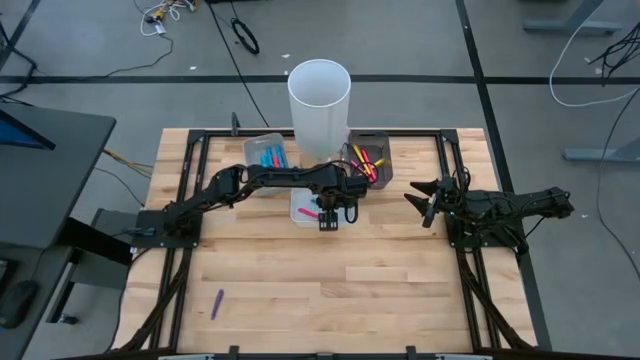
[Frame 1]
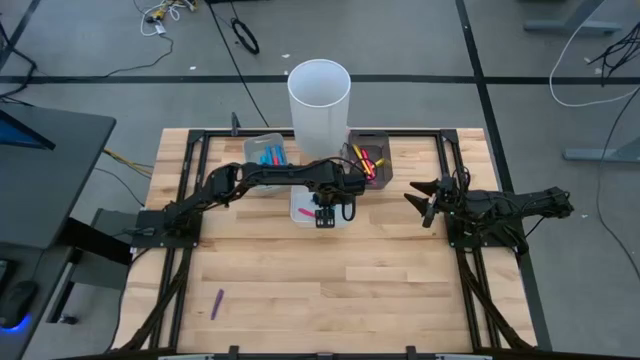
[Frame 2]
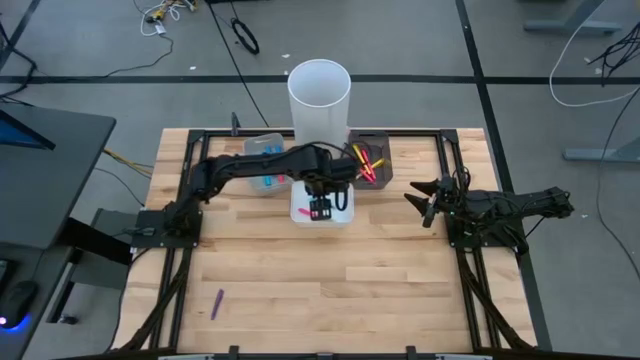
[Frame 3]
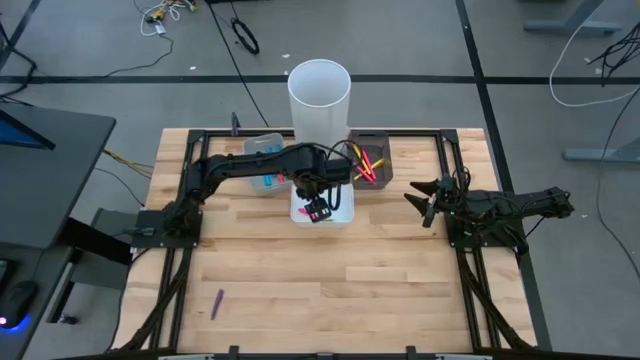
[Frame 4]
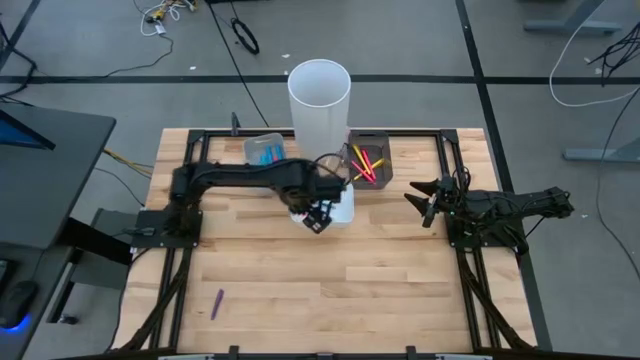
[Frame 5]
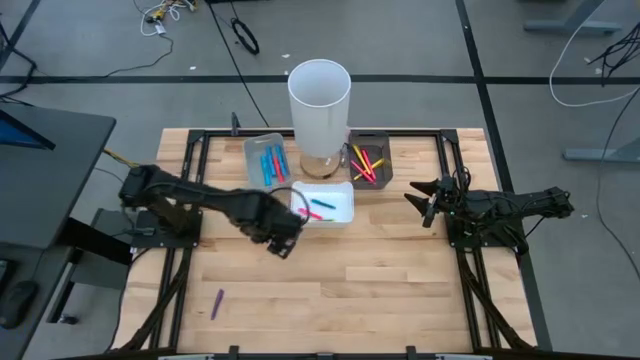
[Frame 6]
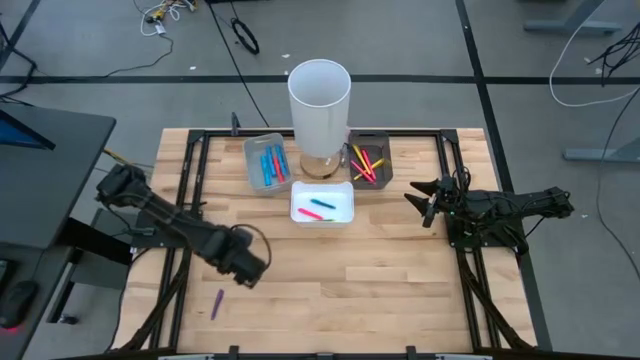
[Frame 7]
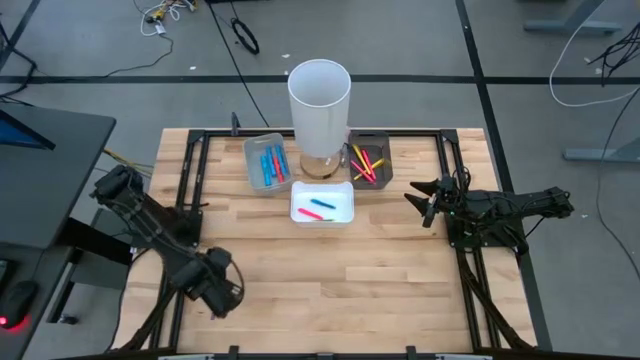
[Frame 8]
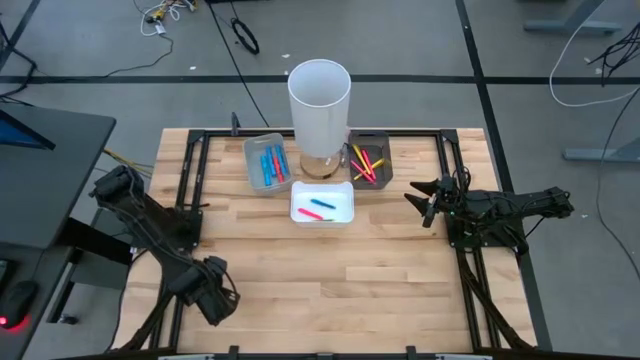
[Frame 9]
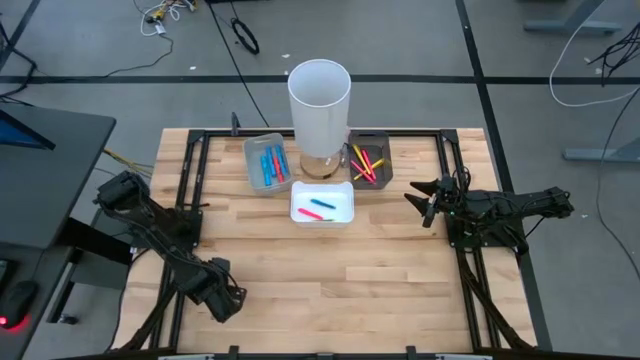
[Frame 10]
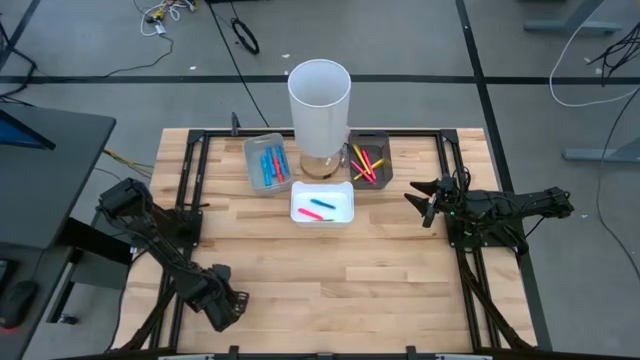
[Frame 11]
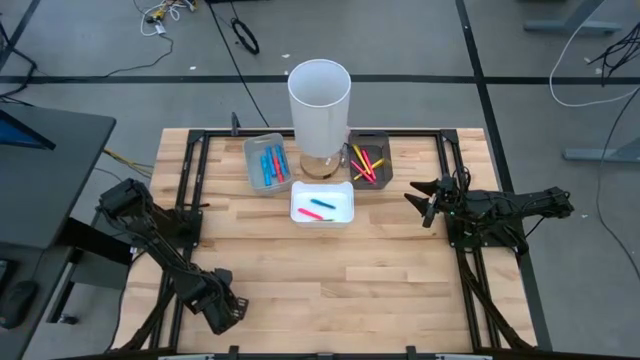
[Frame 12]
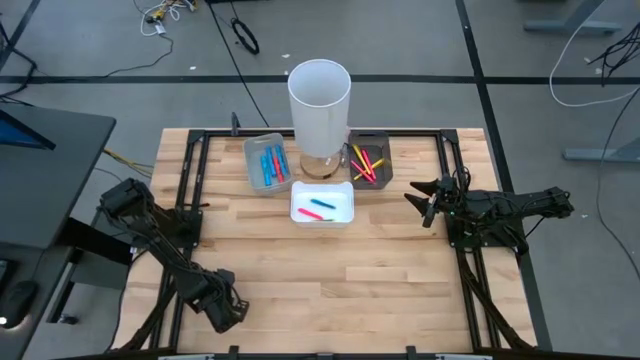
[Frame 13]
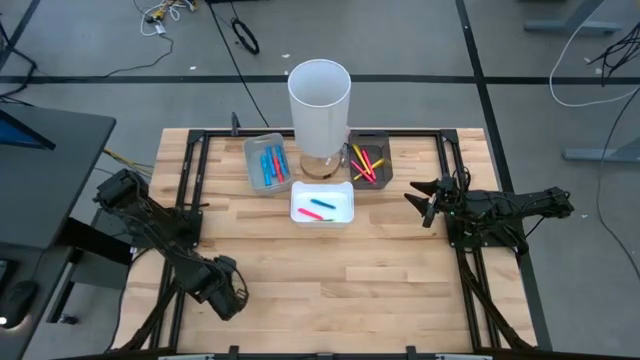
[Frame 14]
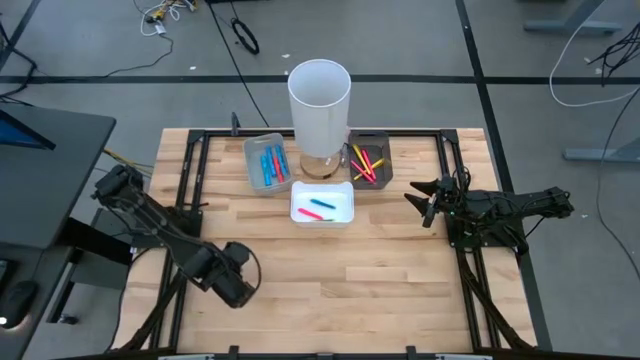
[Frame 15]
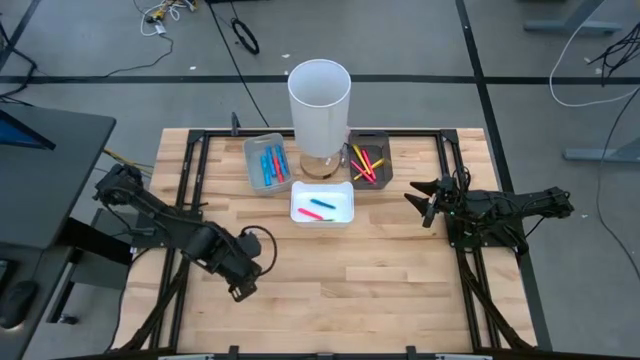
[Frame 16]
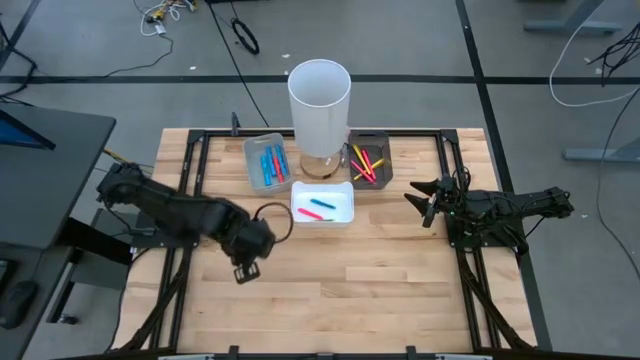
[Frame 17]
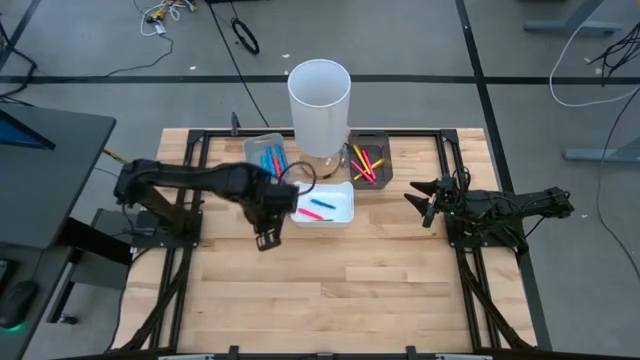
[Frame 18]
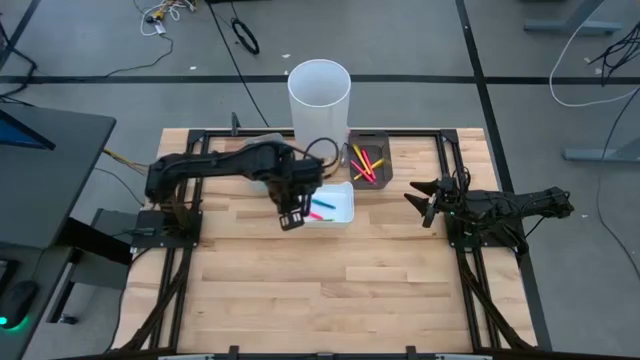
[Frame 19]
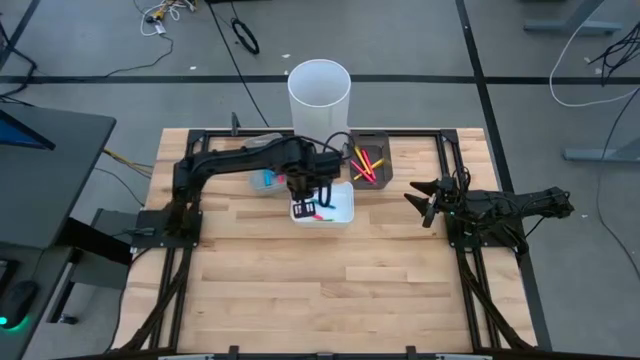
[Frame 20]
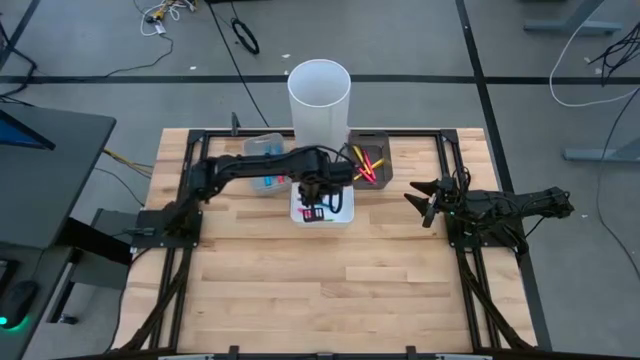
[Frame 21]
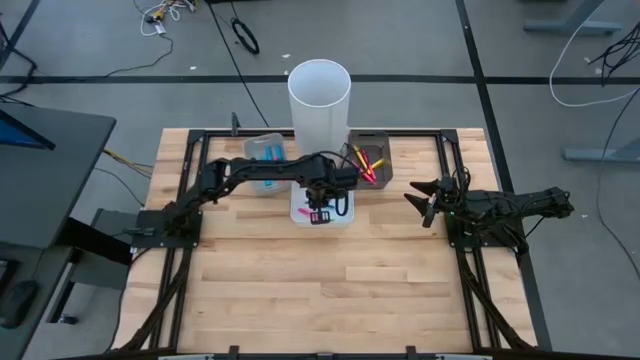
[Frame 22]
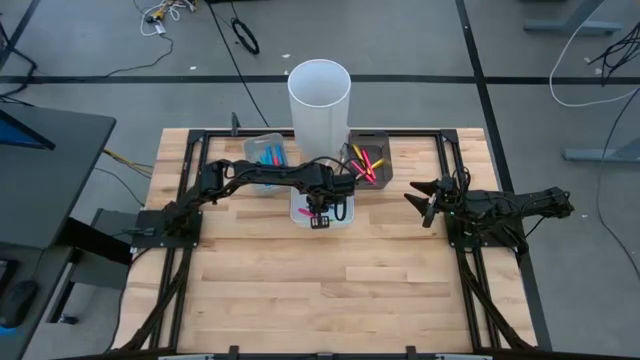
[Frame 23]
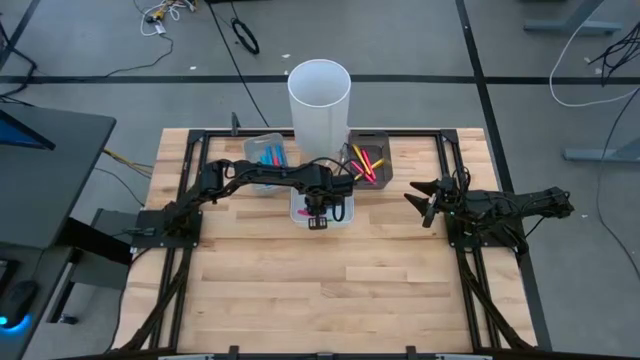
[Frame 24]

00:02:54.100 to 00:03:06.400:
Task: Pick & Place Markers
Put the purple pen into the white bin

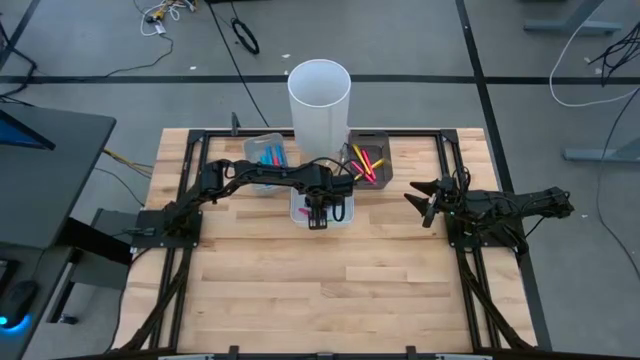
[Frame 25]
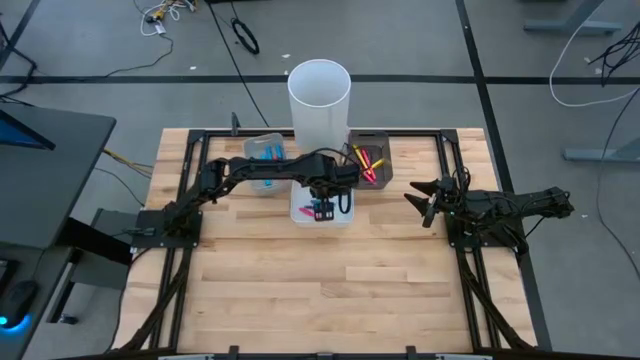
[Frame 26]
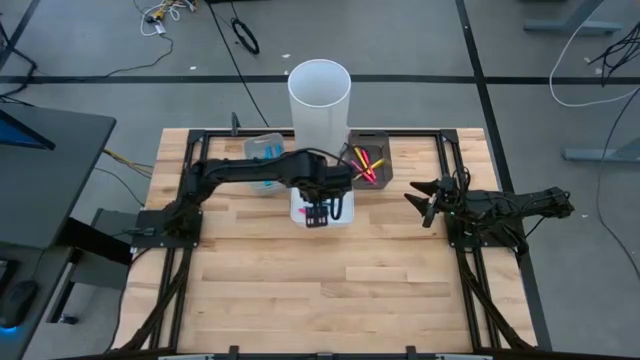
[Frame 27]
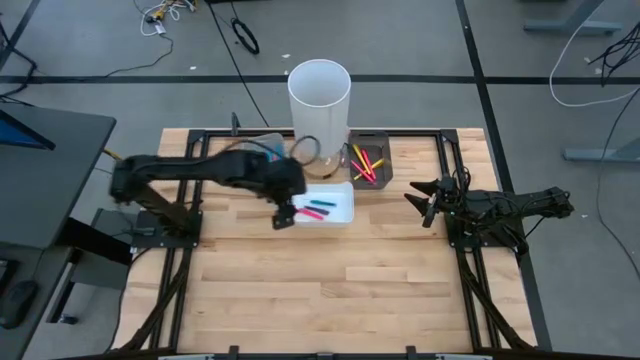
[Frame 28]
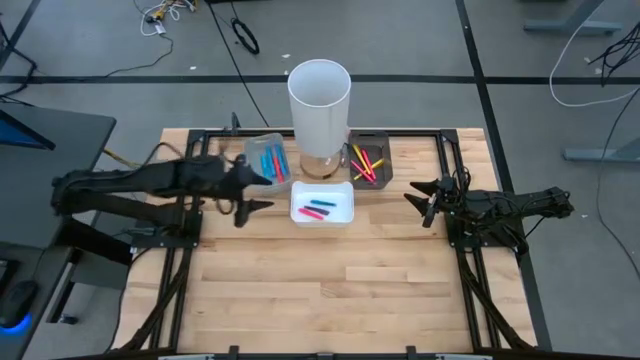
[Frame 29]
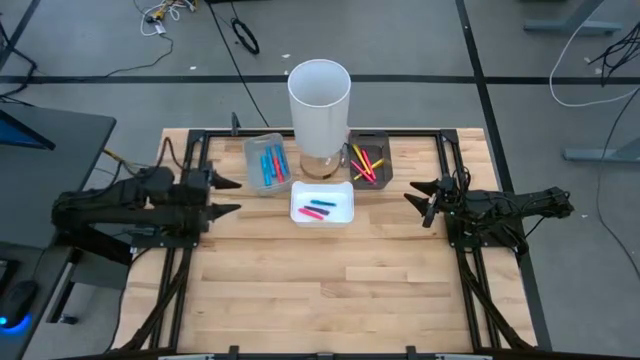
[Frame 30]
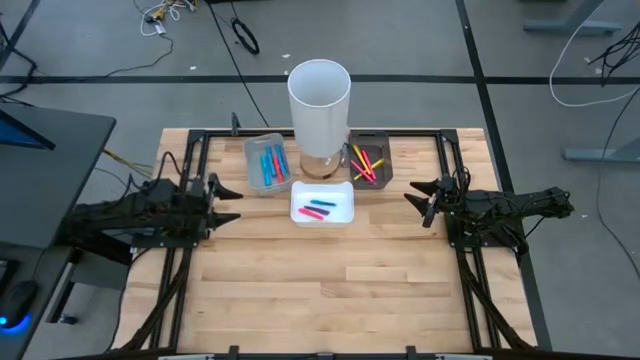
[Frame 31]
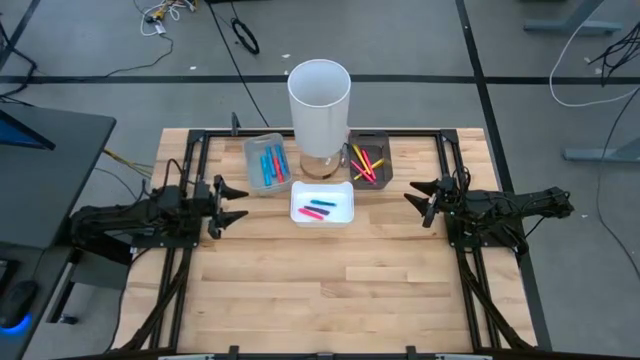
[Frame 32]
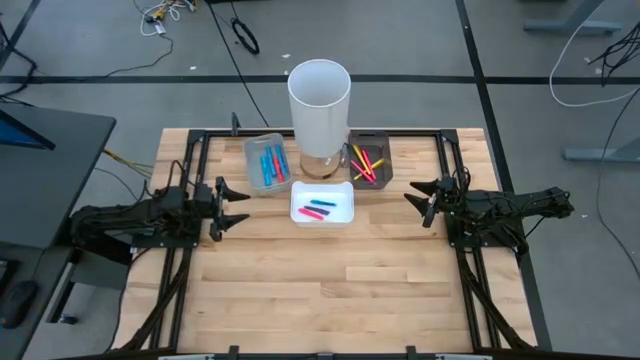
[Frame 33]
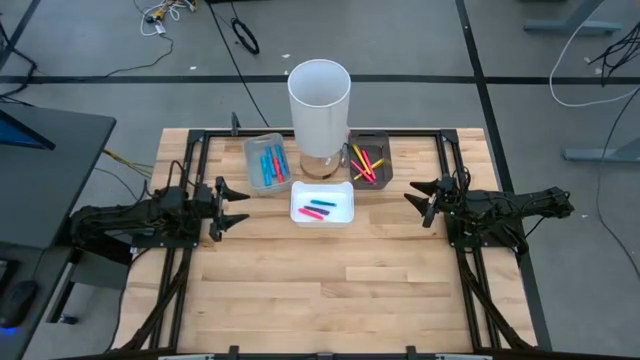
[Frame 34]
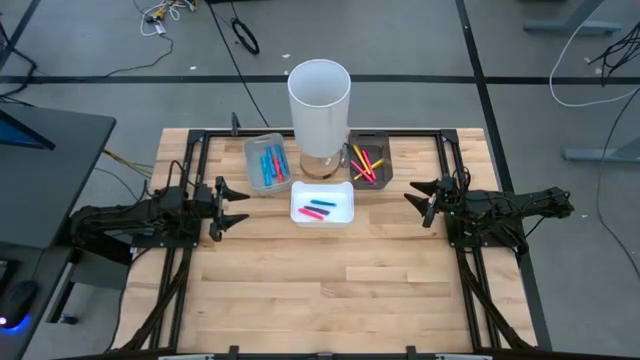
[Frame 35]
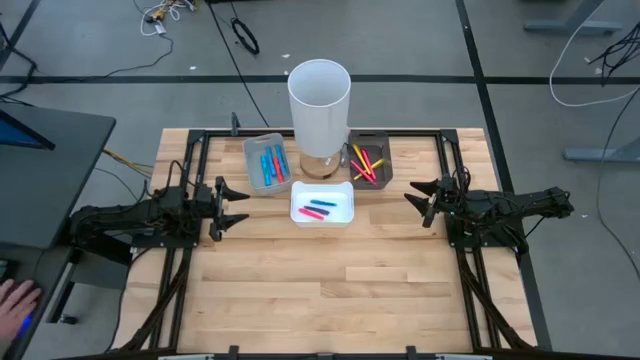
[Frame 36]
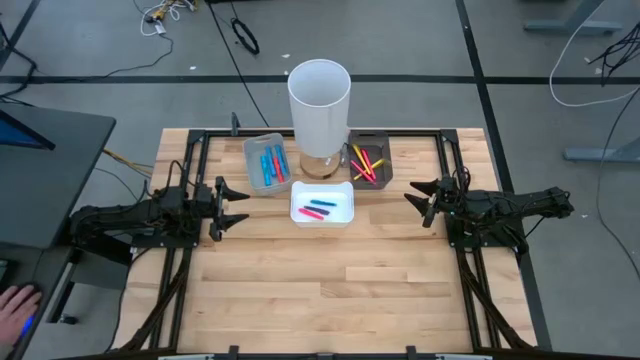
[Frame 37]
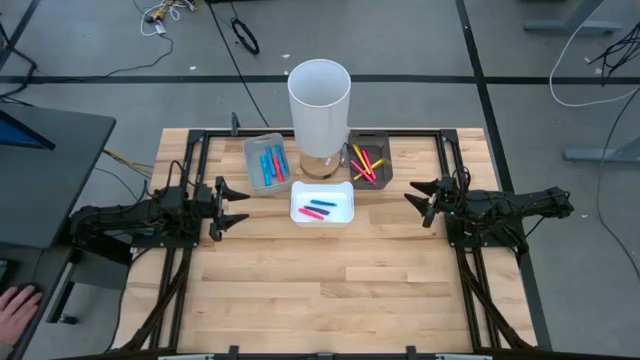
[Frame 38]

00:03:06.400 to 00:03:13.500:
Return to Home Position

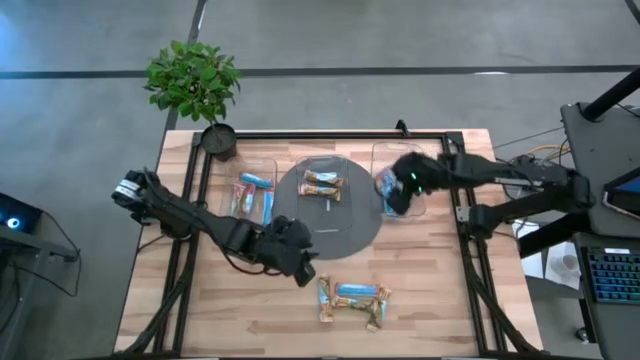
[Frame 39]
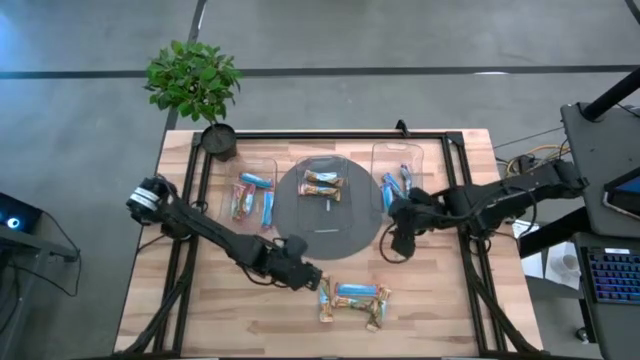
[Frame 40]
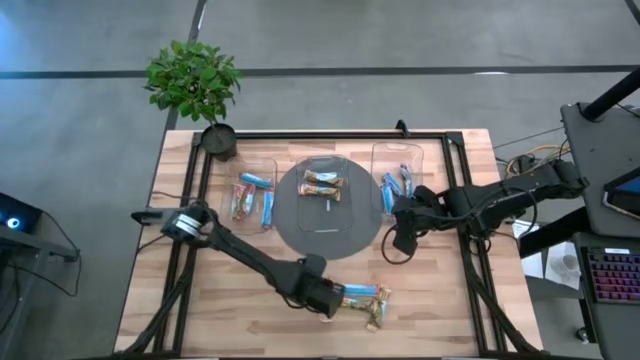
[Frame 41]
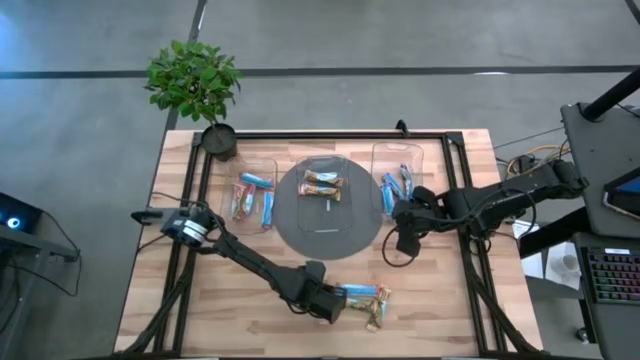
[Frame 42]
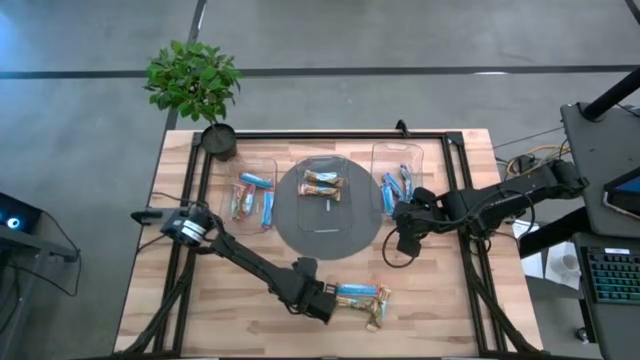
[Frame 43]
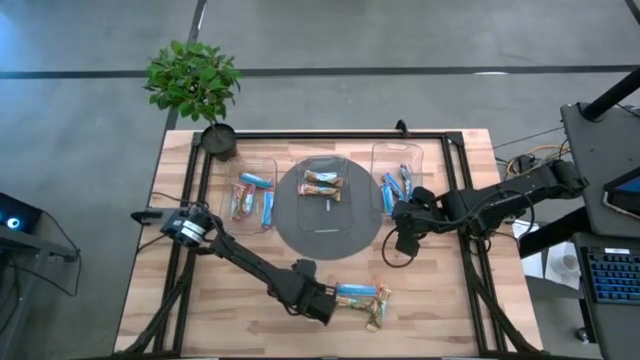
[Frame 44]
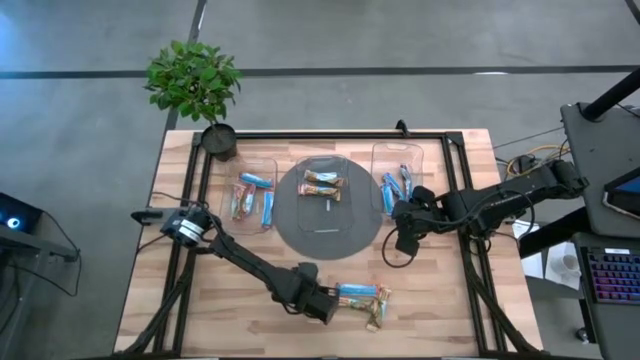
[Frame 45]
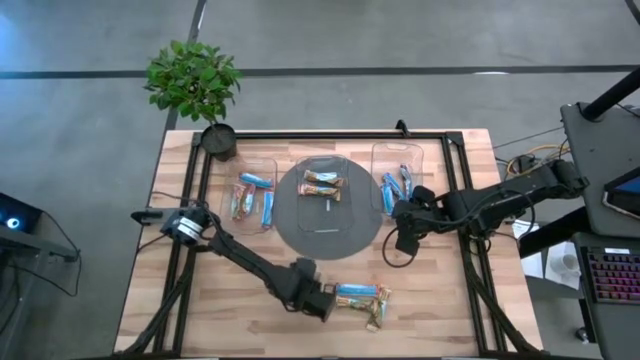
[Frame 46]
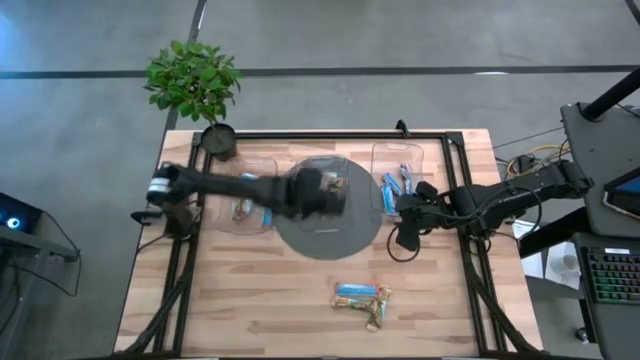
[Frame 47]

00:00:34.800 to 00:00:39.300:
Task: Pick and place Granola Bars by type
Put the yellow granola bar into the middle transparent bin
